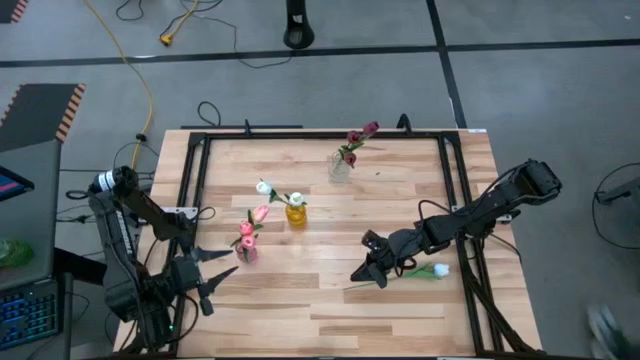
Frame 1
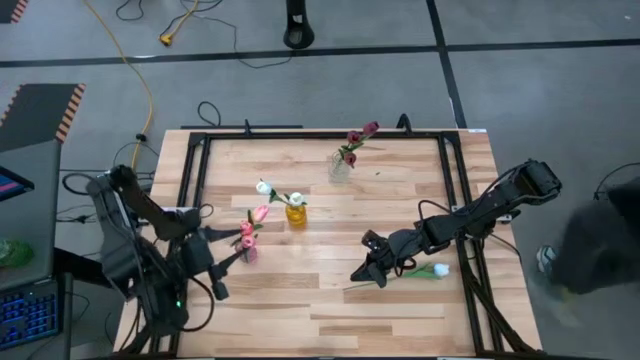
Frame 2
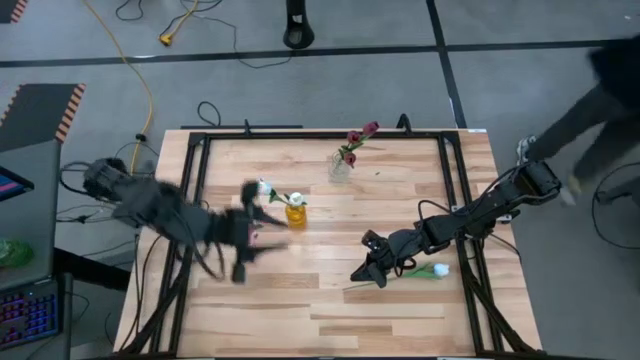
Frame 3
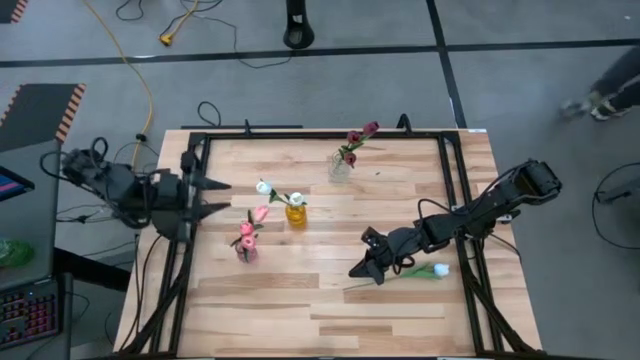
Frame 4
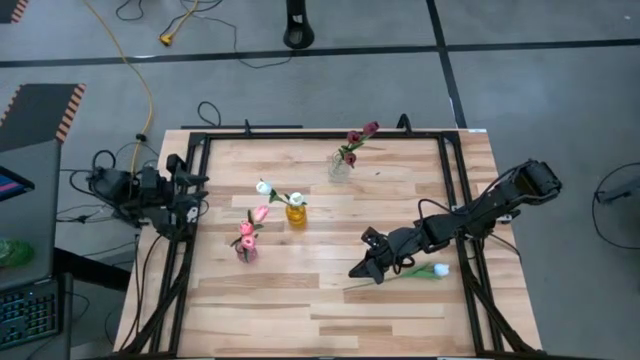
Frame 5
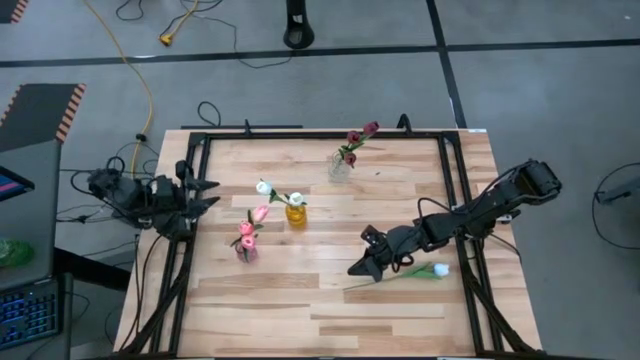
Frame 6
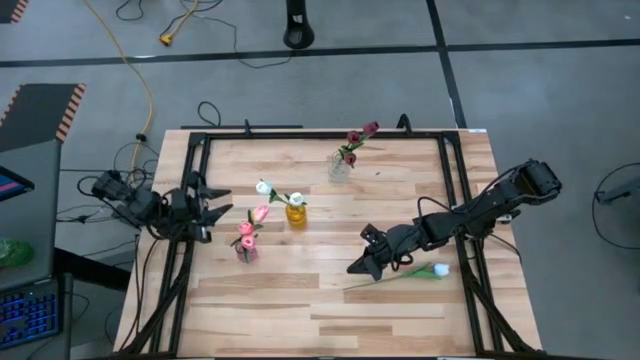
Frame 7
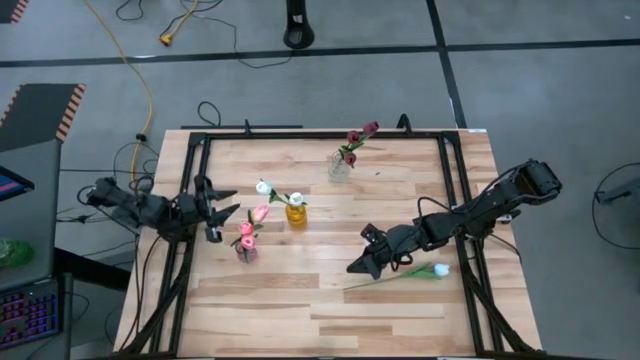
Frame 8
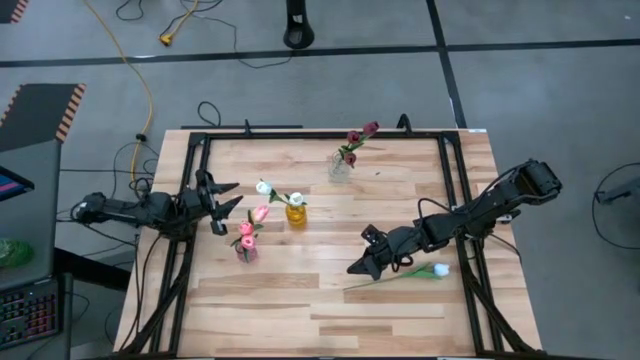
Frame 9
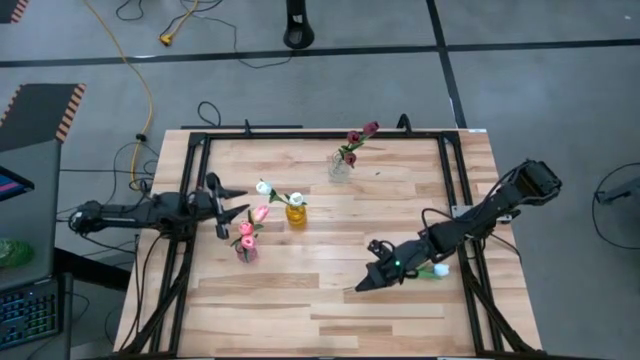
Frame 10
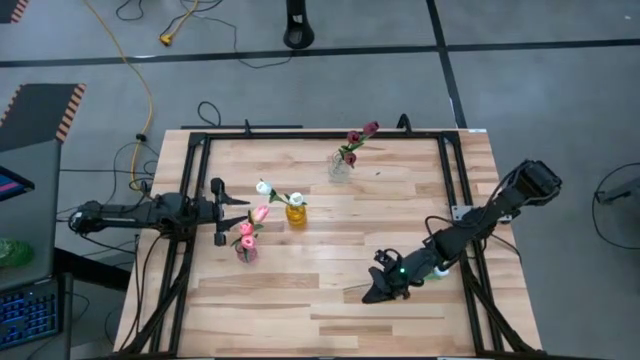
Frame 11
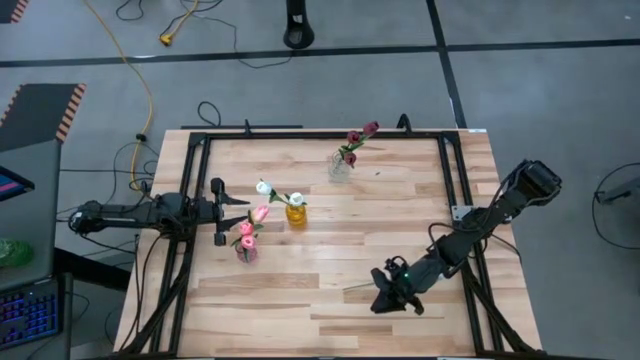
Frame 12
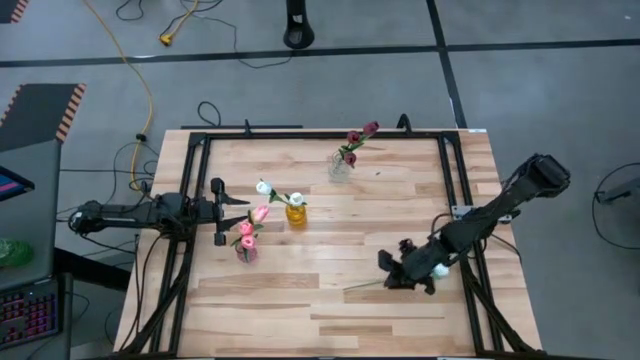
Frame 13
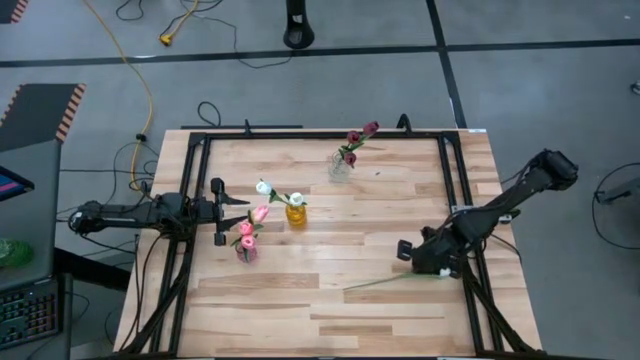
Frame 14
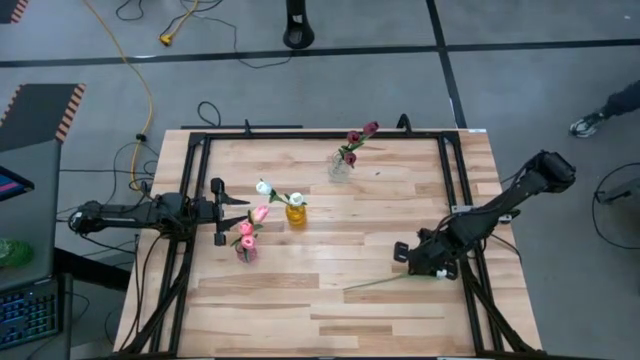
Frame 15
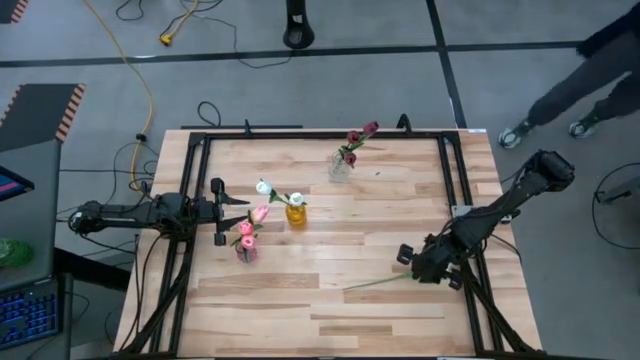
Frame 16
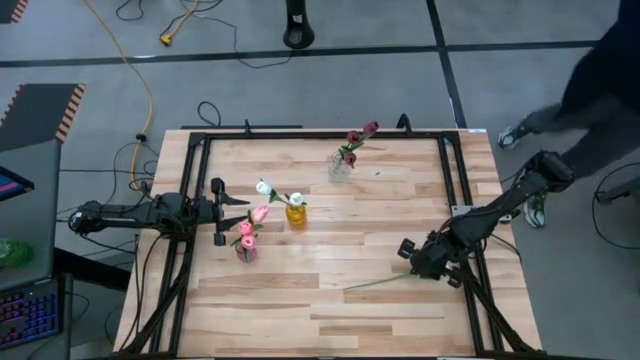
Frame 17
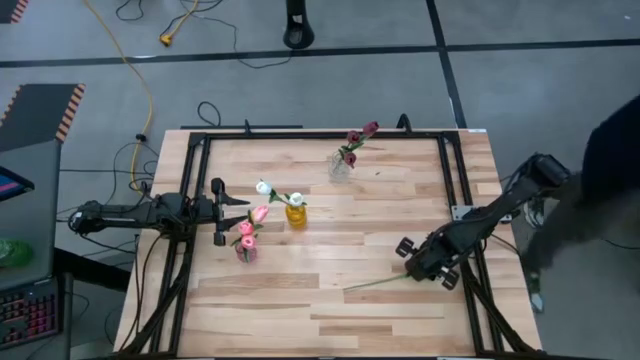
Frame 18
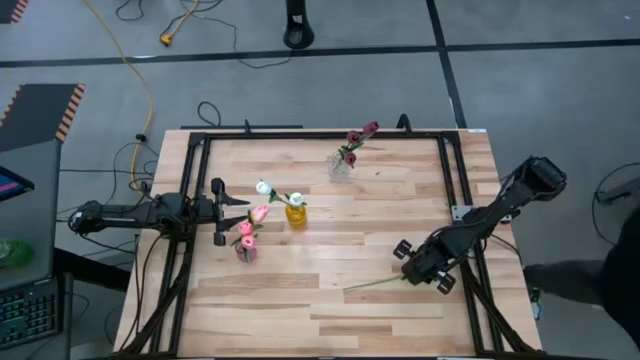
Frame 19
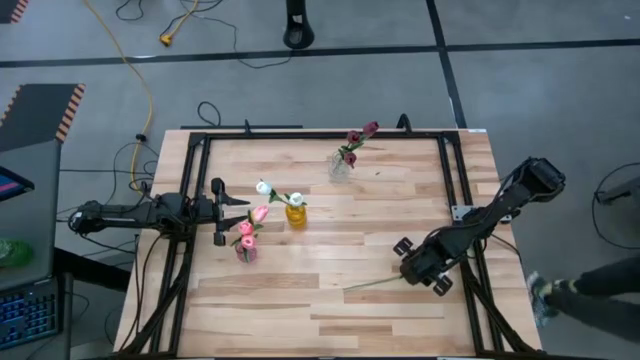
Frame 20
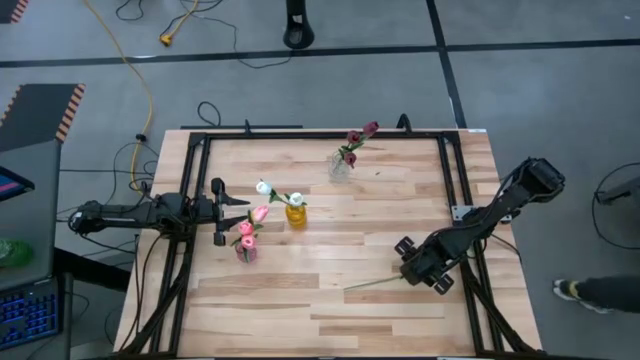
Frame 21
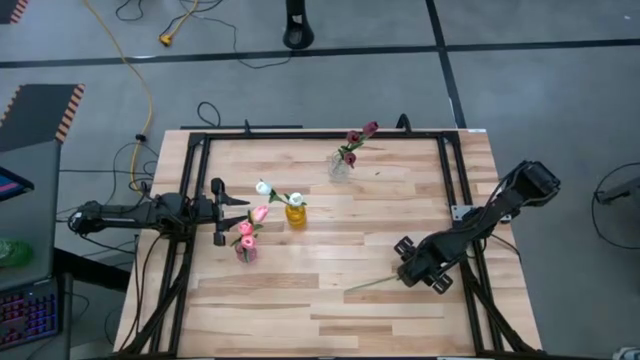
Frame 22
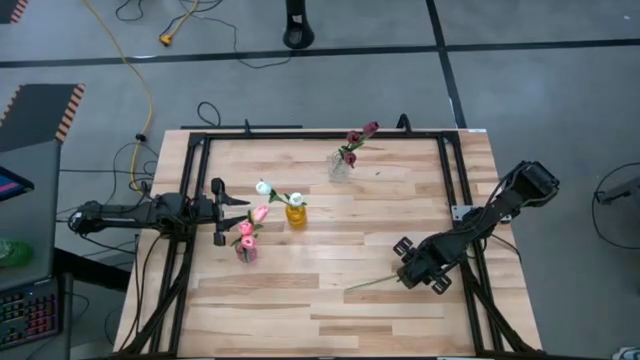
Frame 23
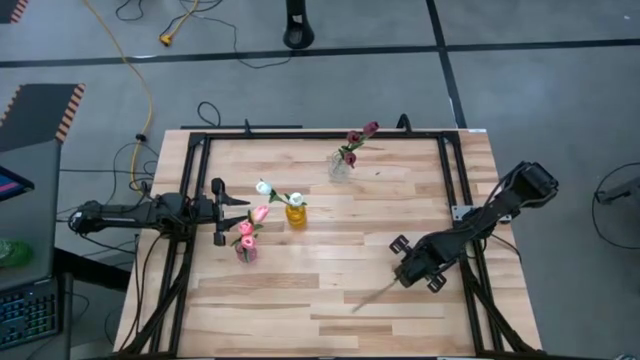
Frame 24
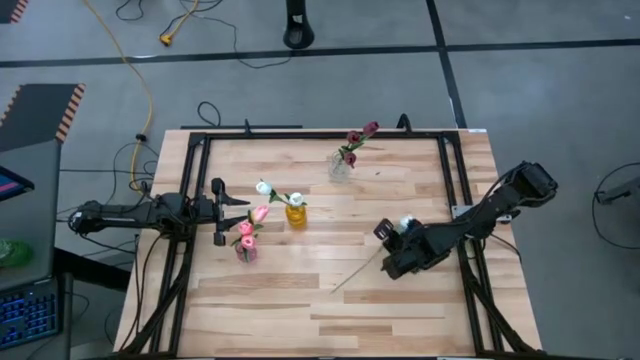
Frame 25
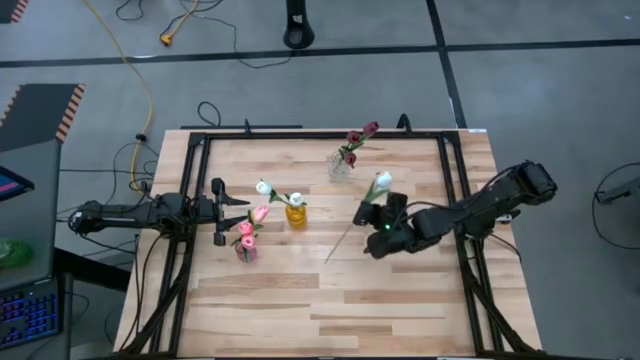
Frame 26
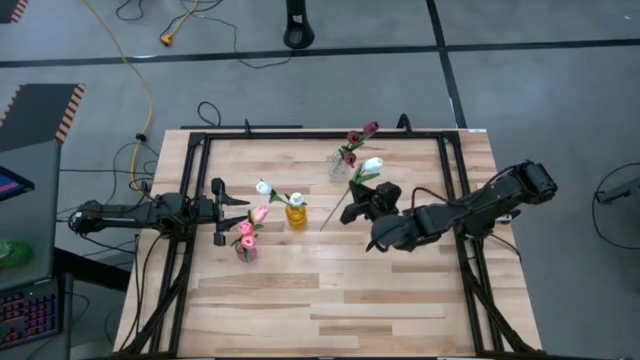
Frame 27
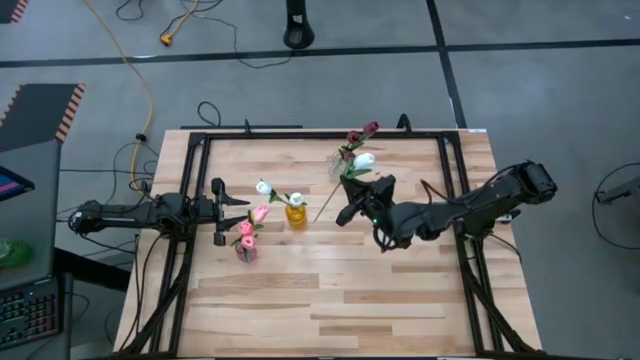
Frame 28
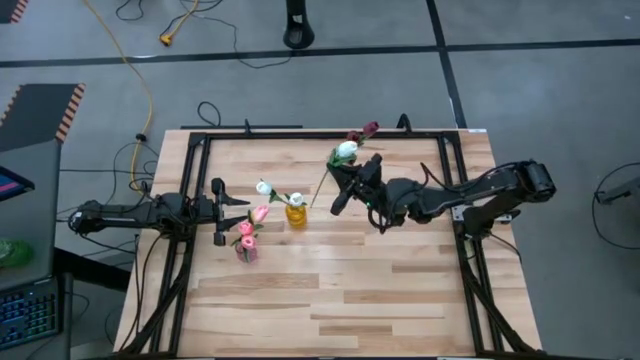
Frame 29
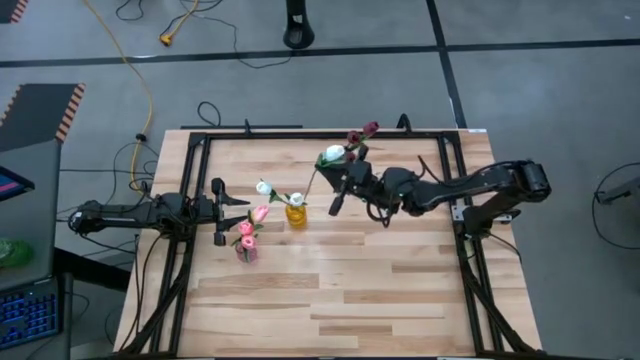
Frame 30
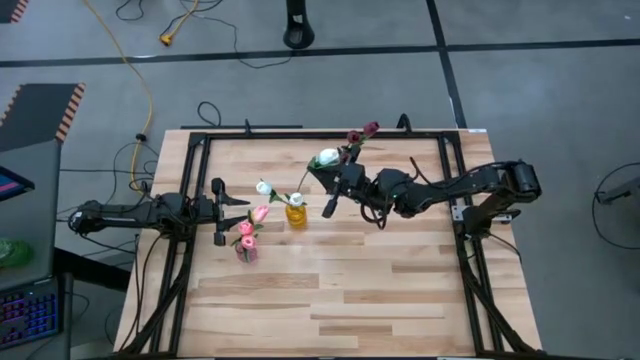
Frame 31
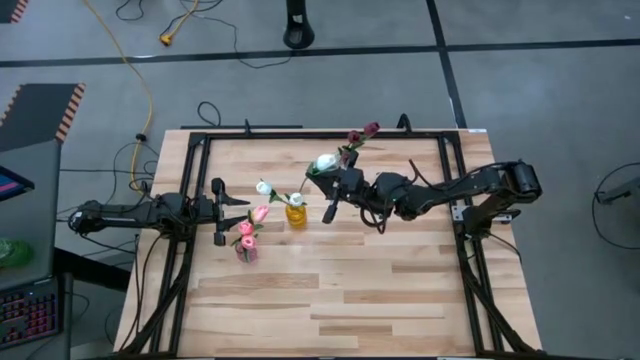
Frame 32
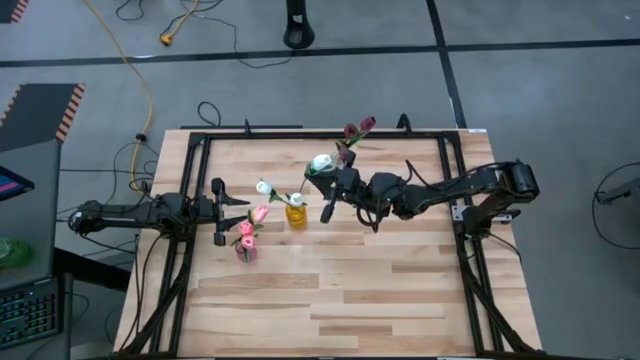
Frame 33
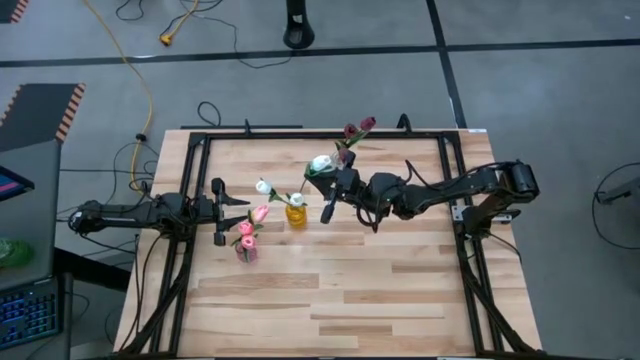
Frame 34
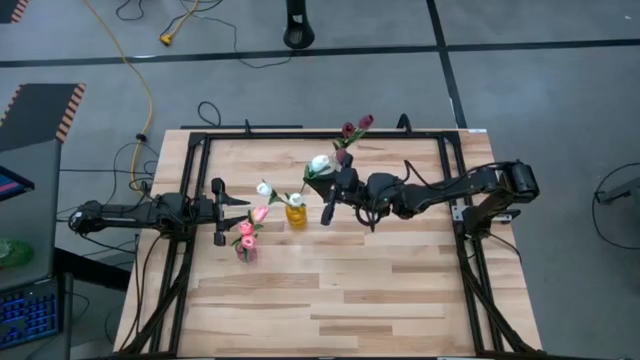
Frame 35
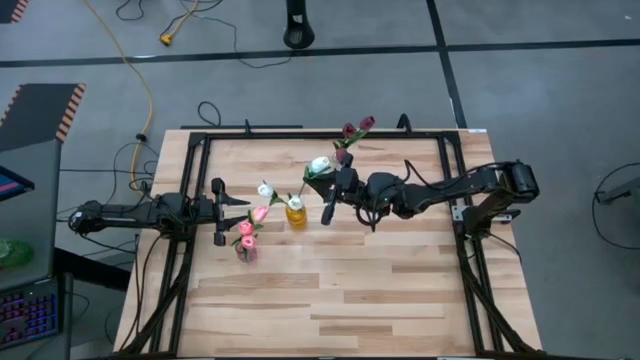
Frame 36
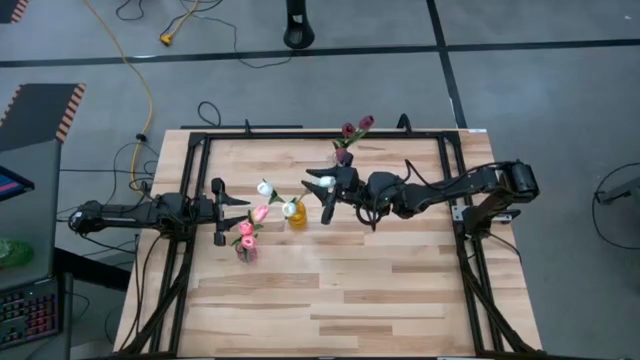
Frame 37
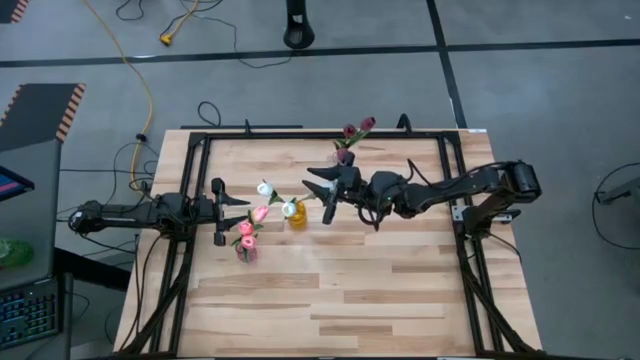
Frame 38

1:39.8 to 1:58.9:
Task: Sort flowers into vase by color
Put the white flower into the yellow vase

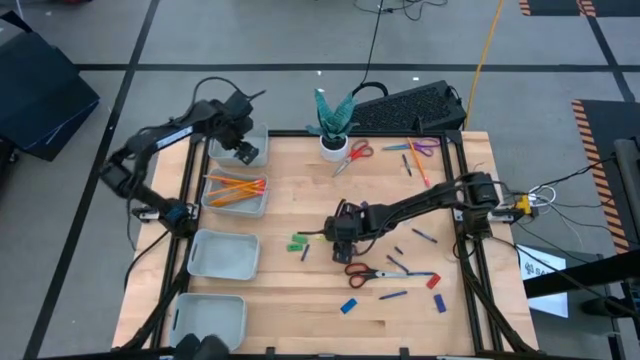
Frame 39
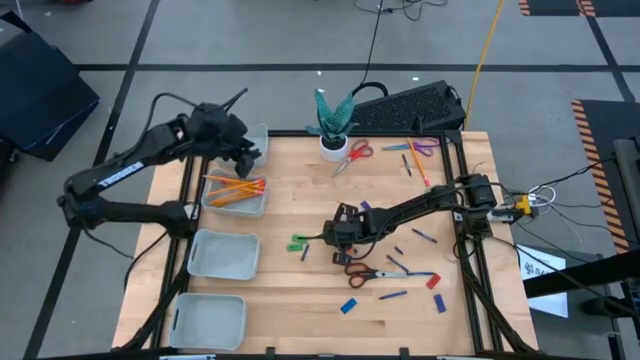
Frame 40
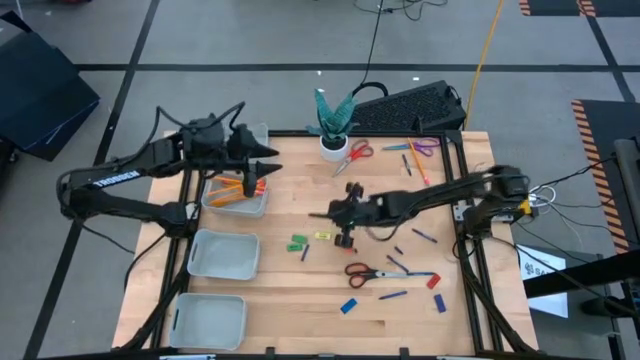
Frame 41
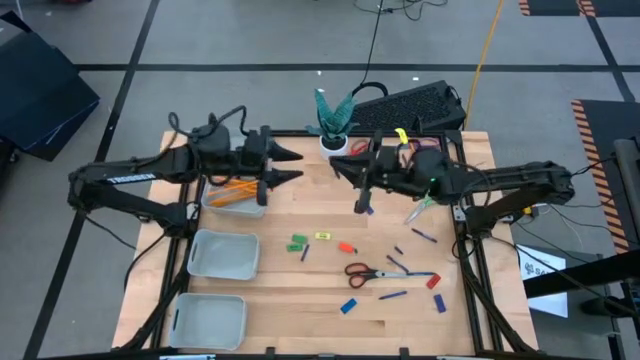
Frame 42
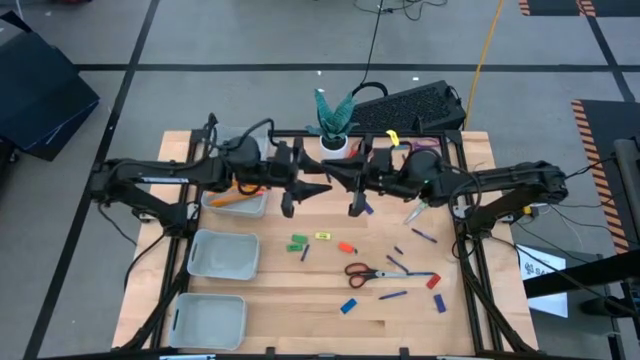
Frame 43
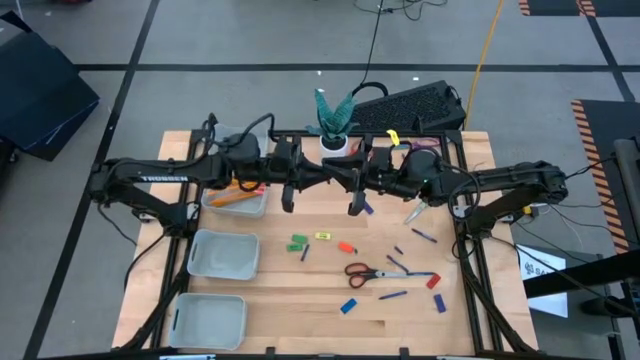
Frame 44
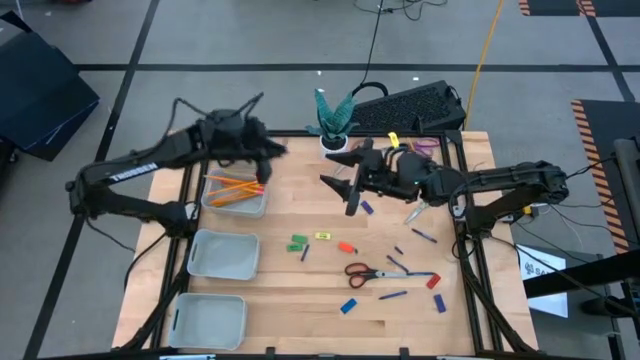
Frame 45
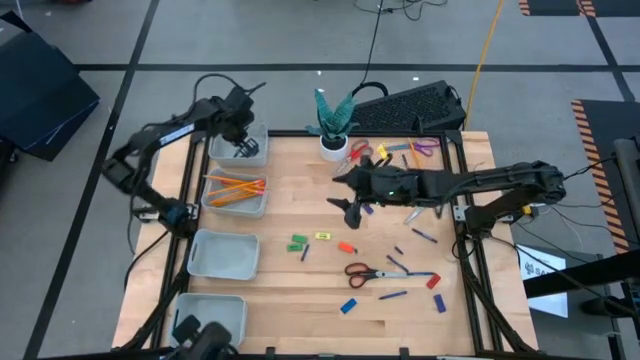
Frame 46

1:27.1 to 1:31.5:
Task: Sort crayons/erasers/pens/pencils in bins
Put the blue crayon into the top gray bin
